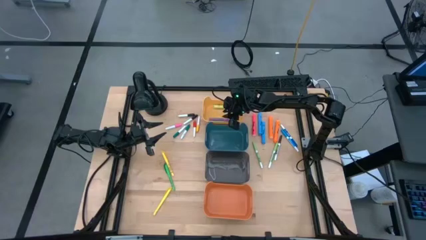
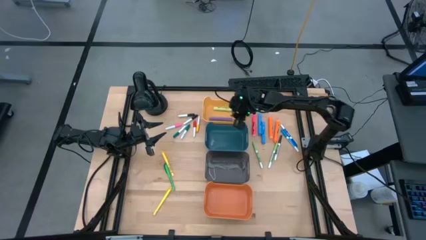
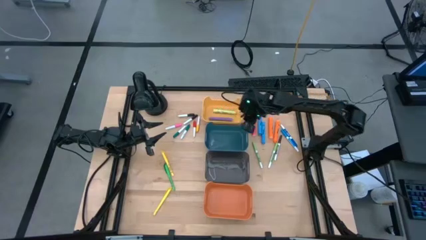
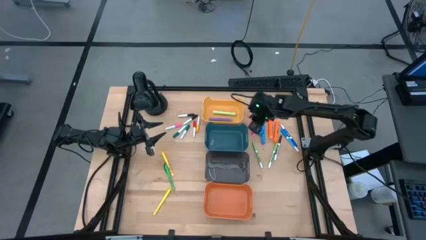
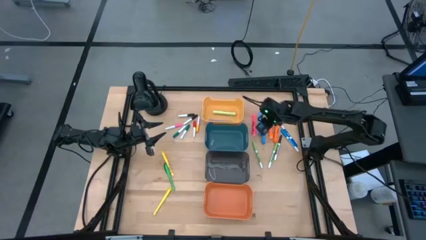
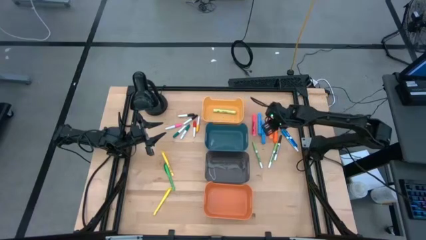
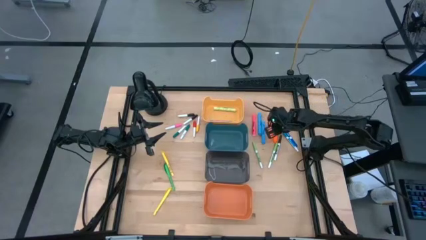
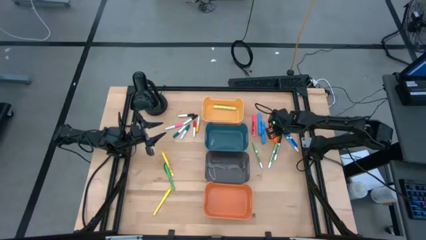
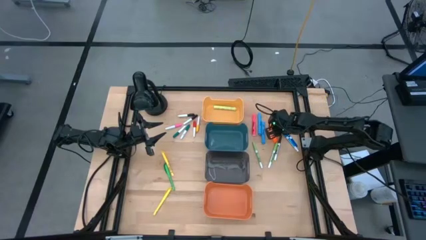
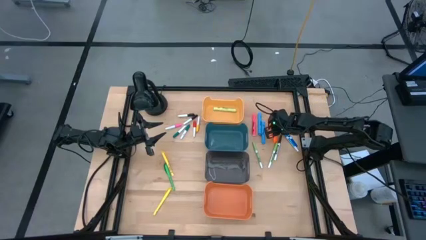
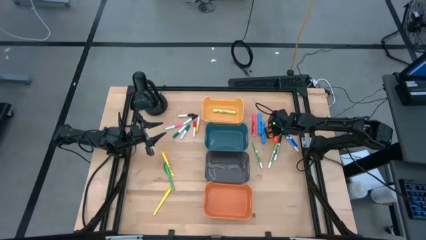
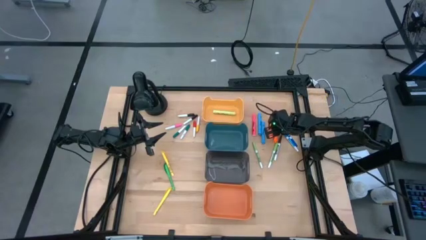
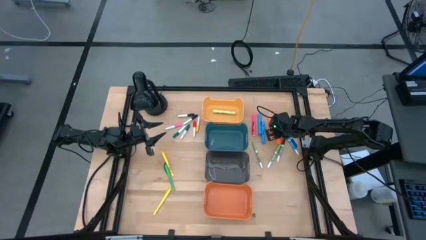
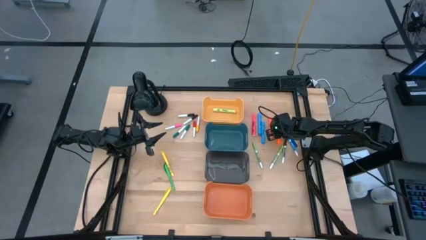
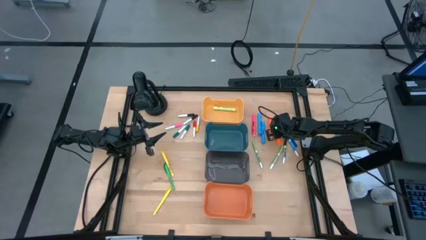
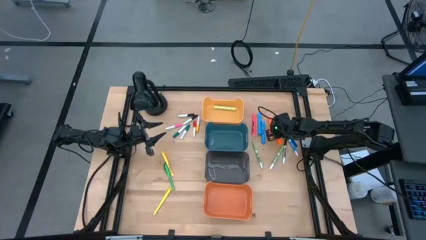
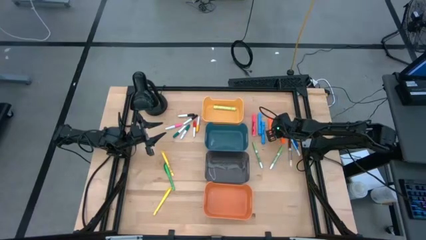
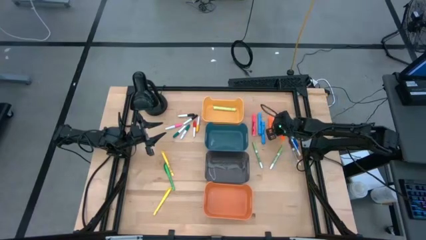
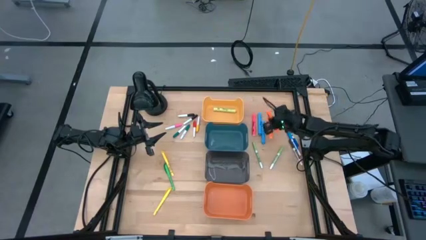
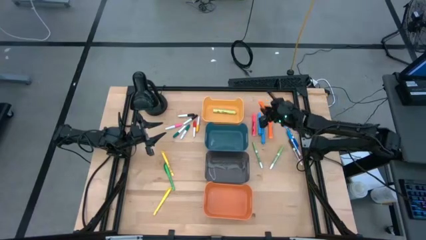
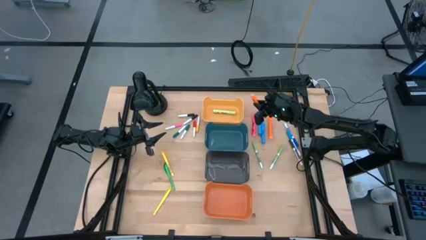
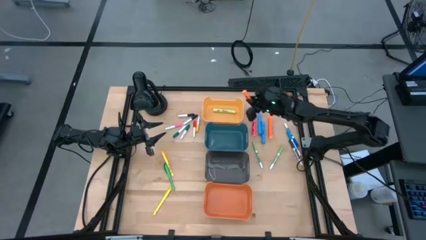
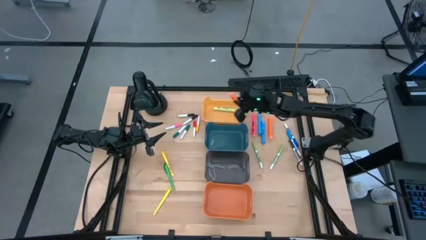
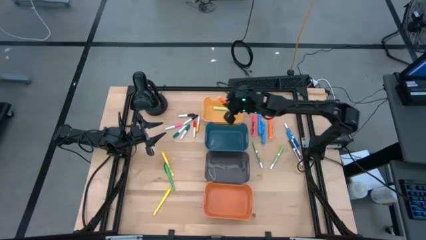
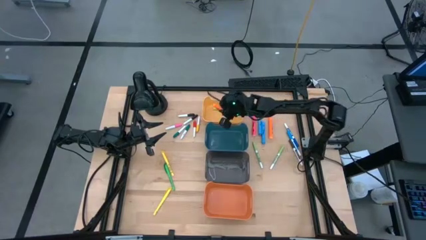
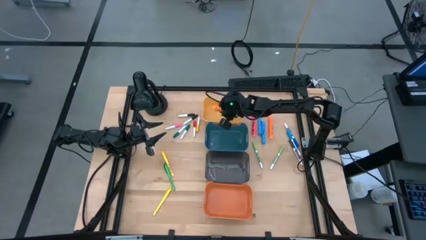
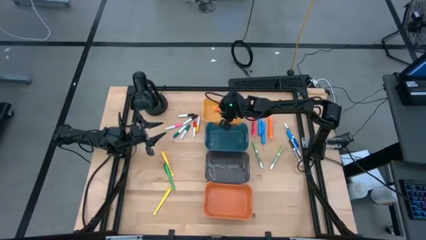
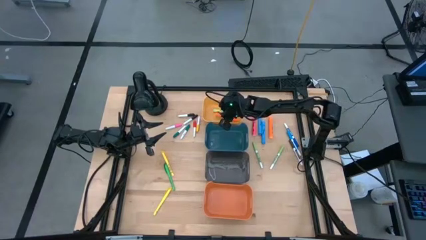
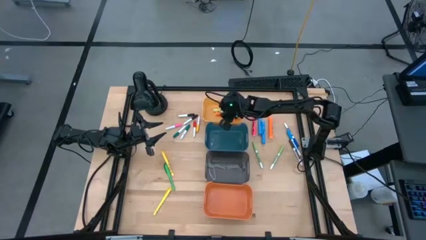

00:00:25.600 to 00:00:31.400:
Task: Pick & Place Markers
Put the right orange highlighter into the yellow bin

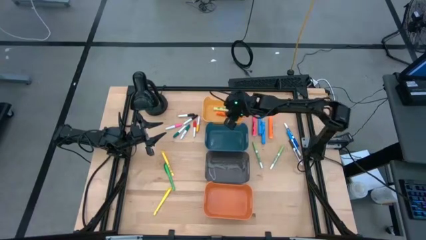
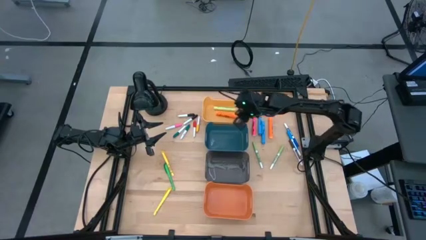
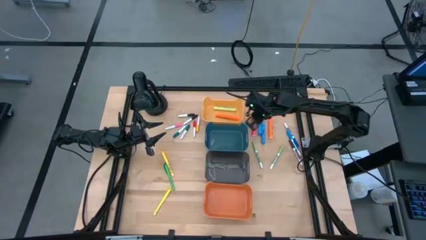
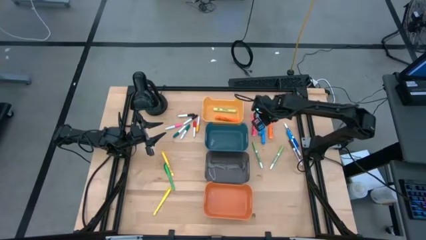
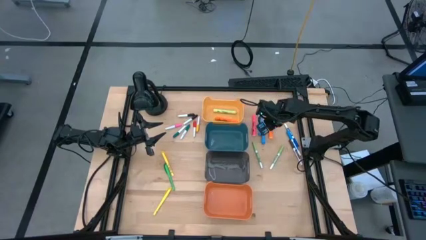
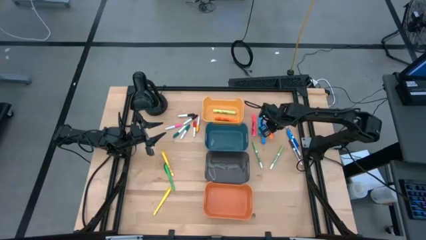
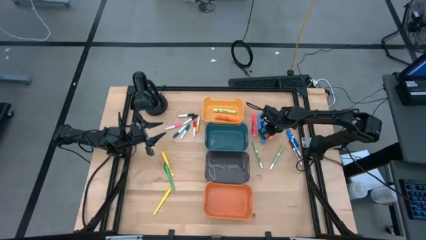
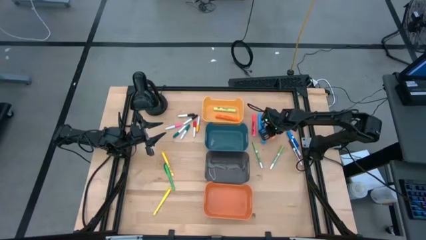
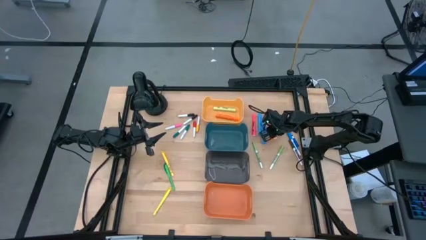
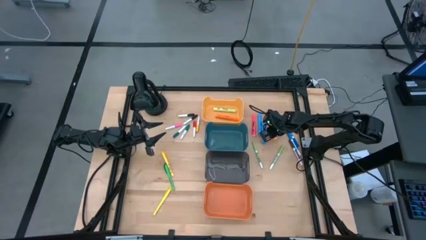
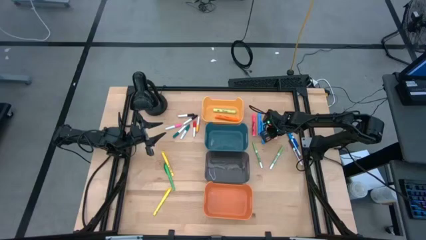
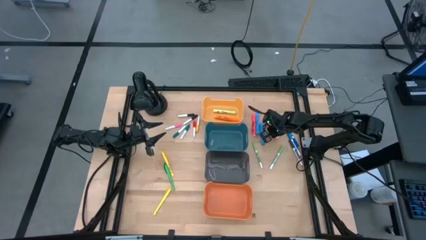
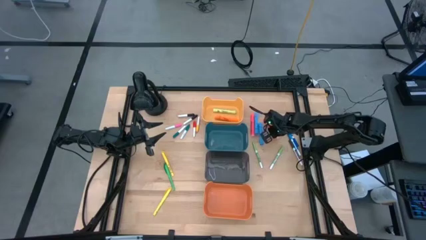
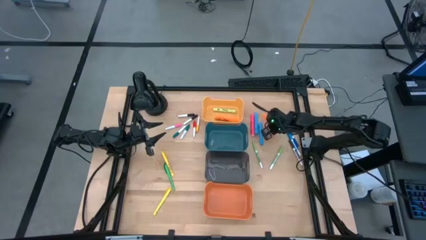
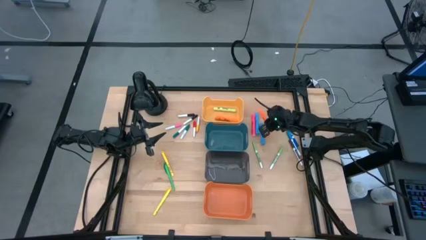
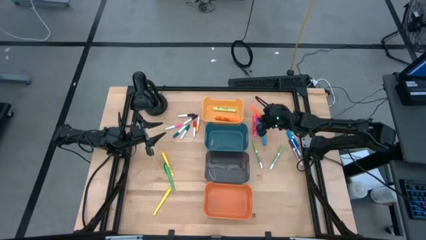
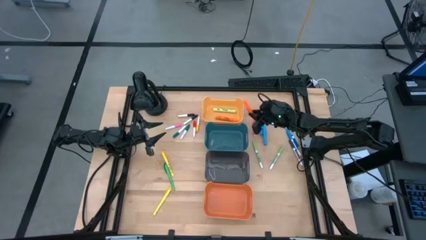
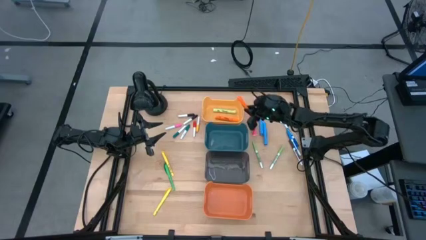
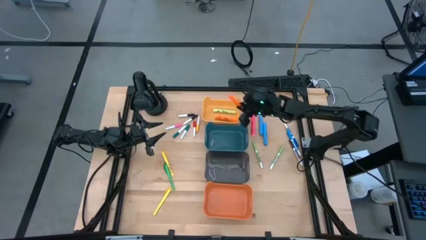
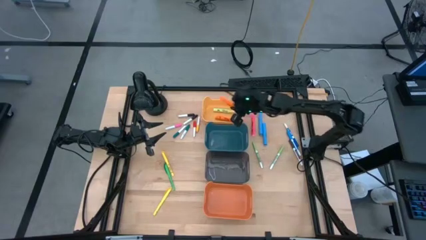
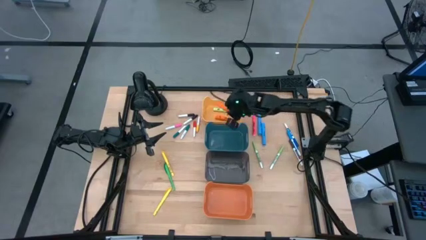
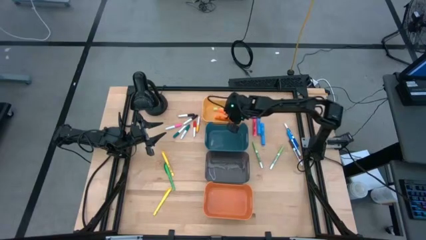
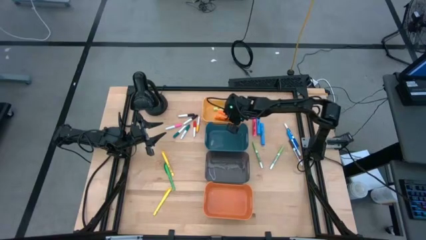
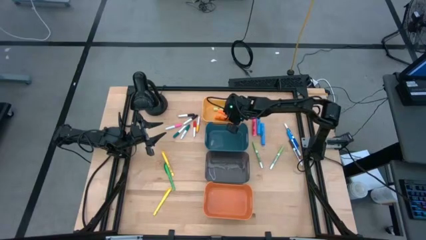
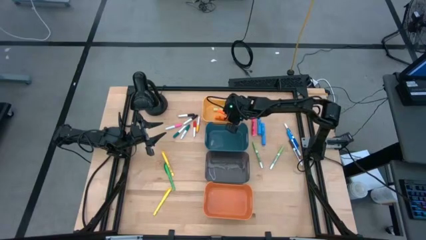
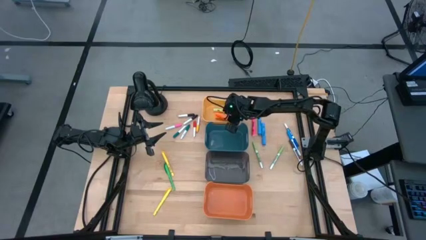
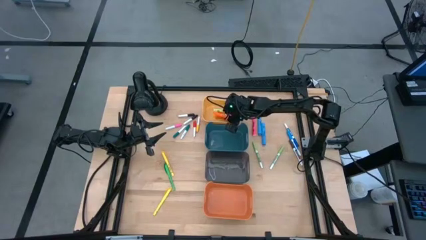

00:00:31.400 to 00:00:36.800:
Put the orange highlighter into the yellow bin

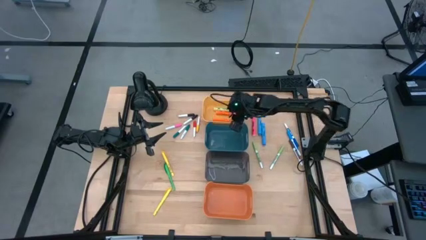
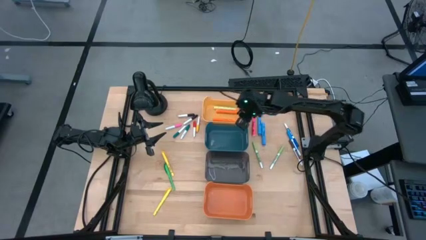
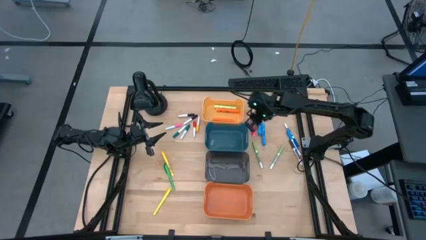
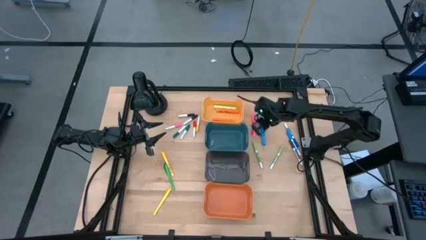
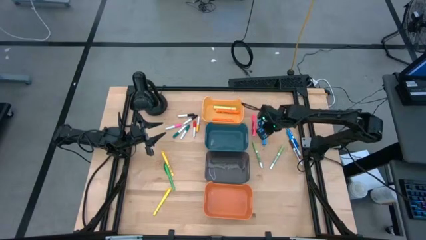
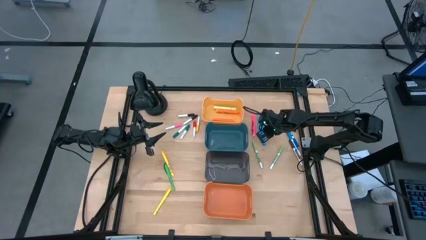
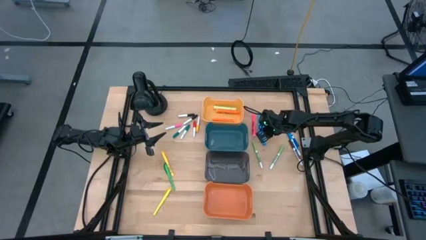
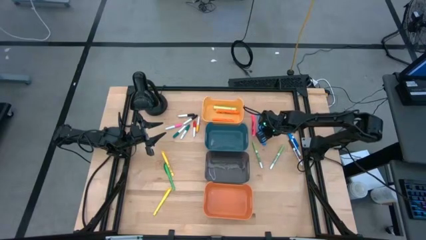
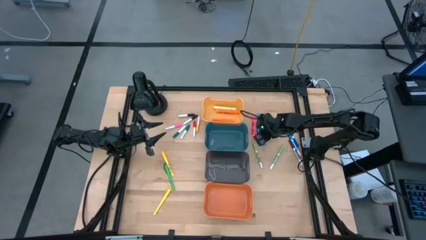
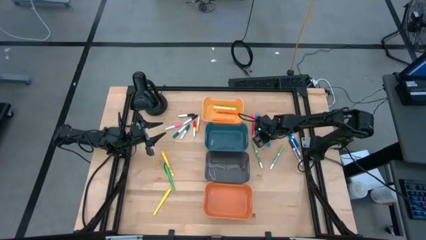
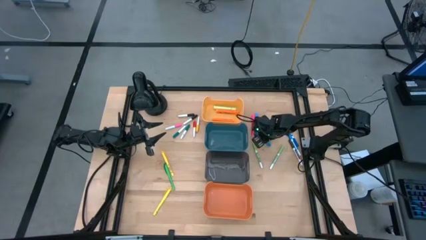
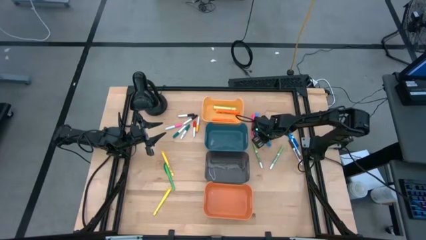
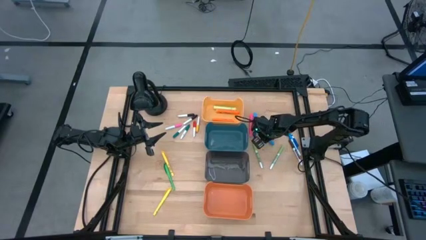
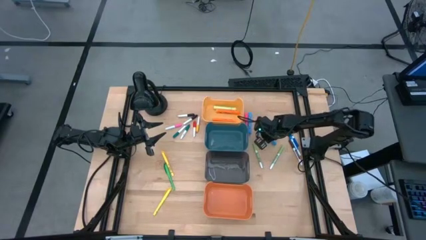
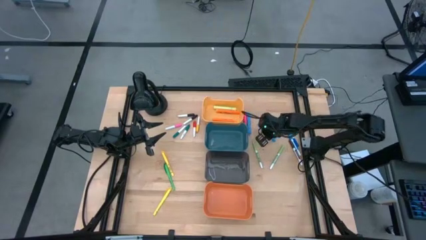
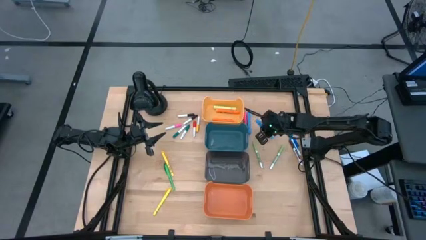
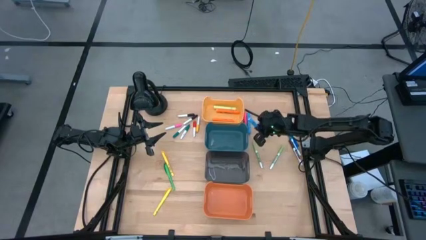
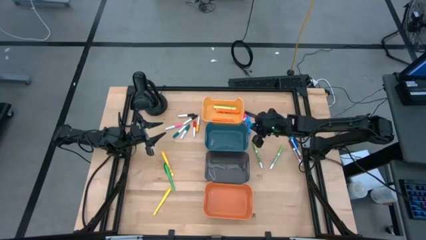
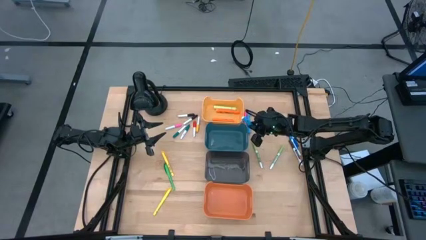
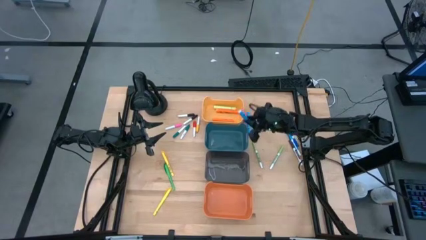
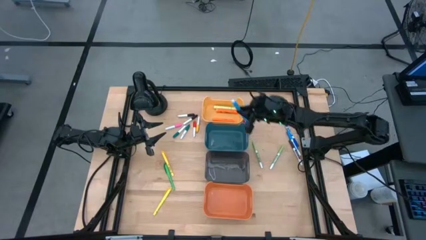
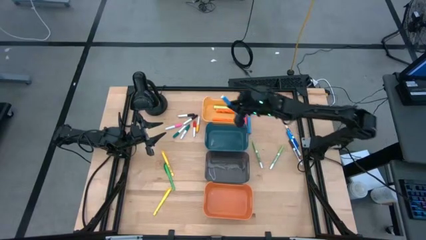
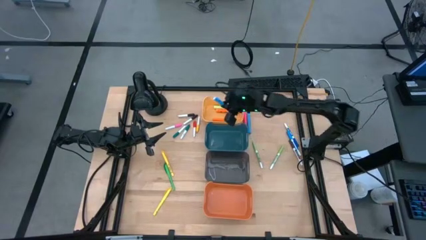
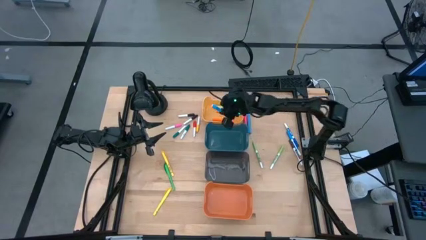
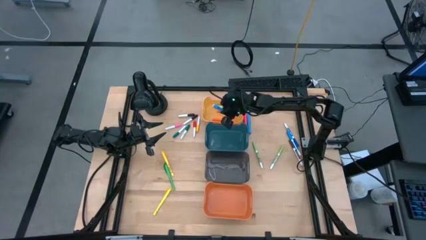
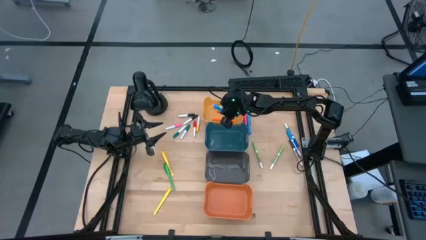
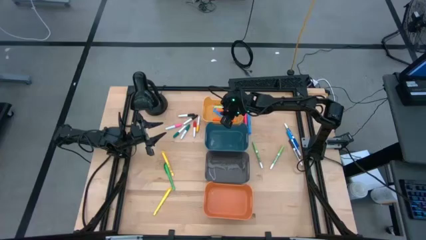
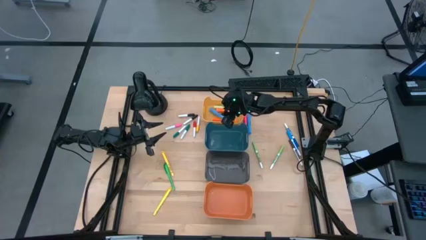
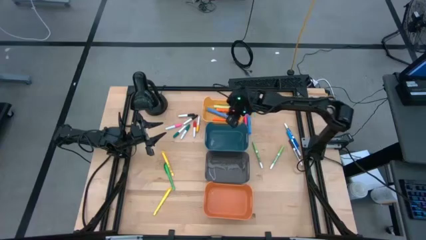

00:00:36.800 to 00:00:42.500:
Put the right blue highlighter into the yellow bin
